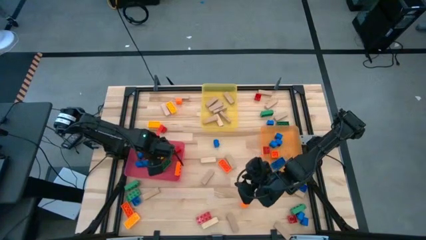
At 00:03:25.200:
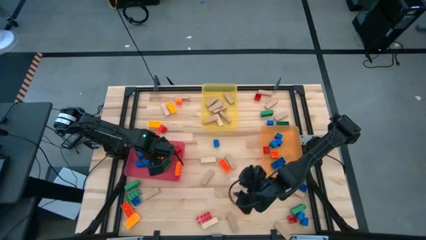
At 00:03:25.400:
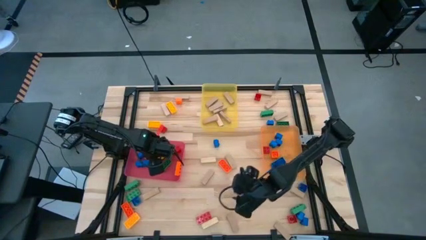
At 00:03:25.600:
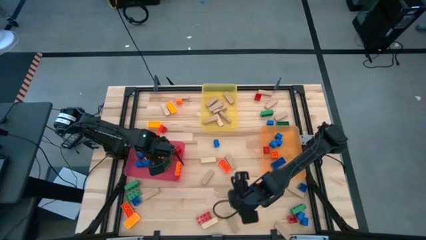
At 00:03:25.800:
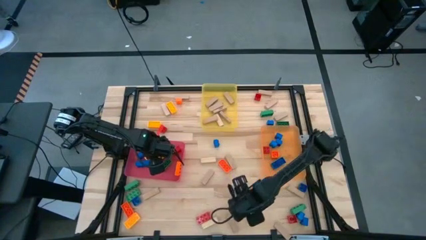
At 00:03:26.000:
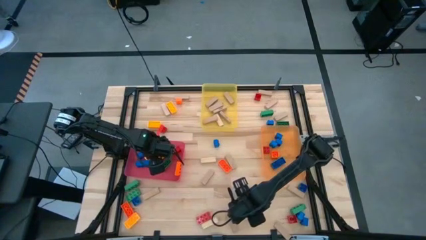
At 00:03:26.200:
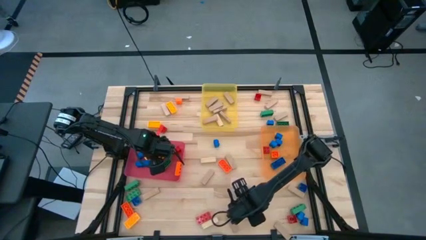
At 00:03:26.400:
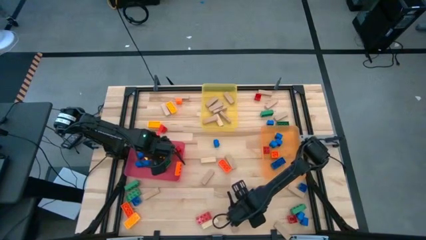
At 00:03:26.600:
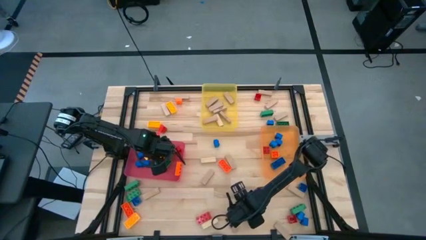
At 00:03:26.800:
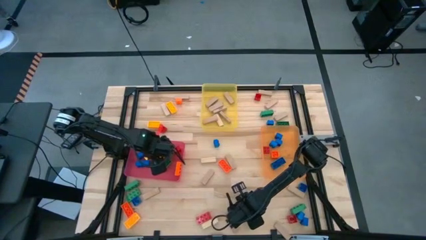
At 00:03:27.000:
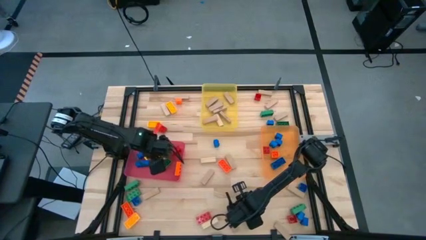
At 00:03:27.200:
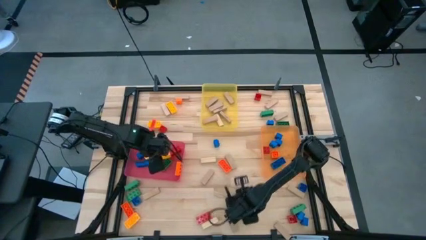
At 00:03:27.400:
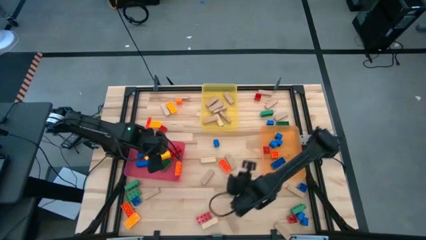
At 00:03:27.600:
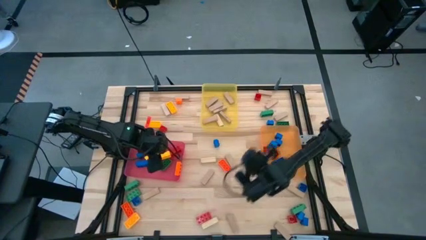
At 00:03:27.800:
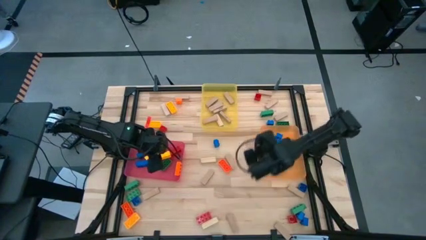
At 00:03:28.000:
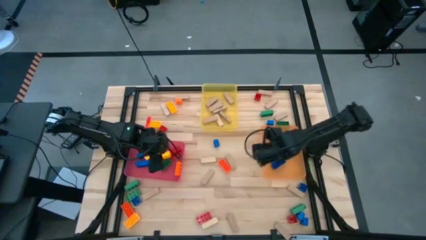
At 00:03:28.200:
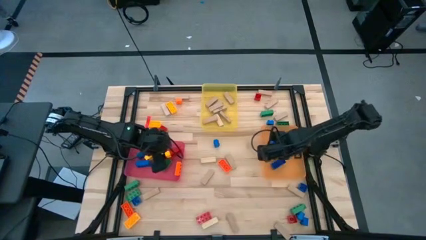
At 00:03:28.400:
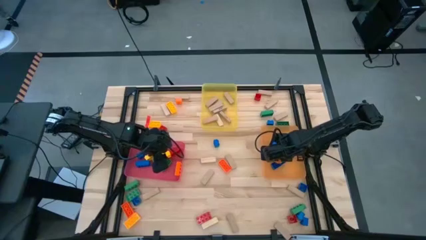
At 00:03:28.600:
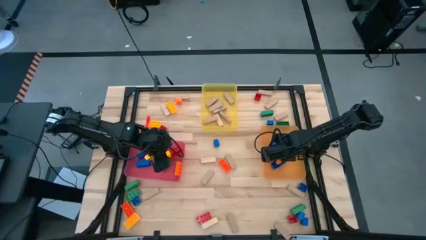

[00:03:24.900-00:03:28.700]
Task: Sort blocks by size
Put the 1 stud orange game piece into the orange bin

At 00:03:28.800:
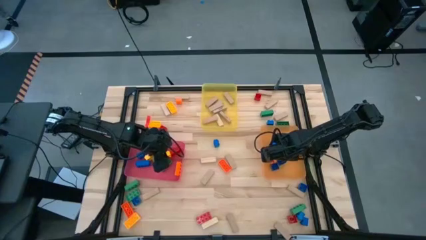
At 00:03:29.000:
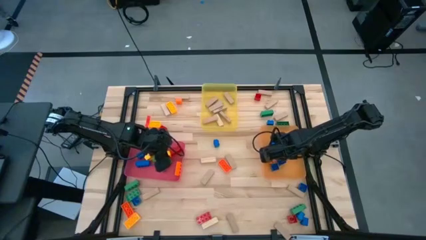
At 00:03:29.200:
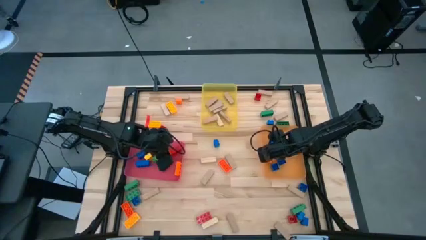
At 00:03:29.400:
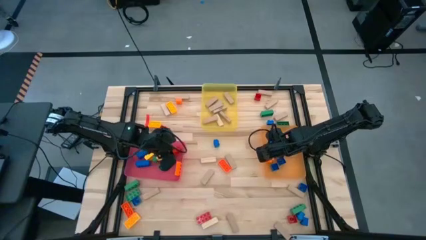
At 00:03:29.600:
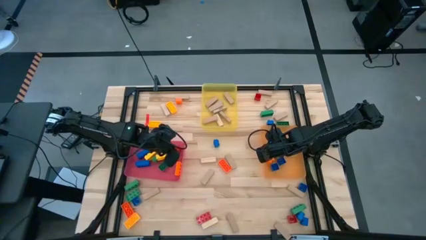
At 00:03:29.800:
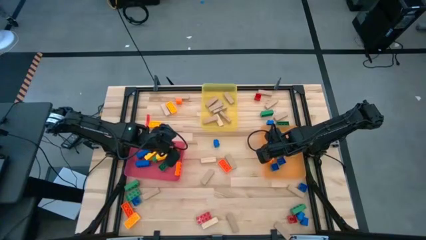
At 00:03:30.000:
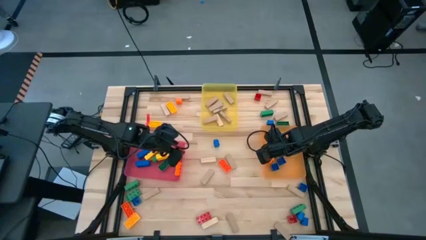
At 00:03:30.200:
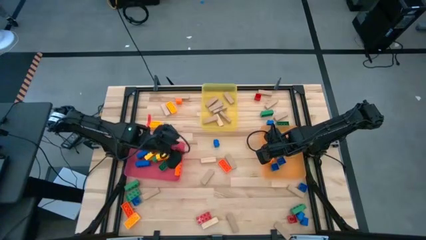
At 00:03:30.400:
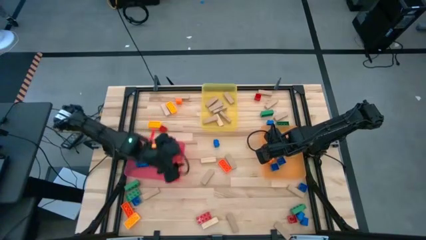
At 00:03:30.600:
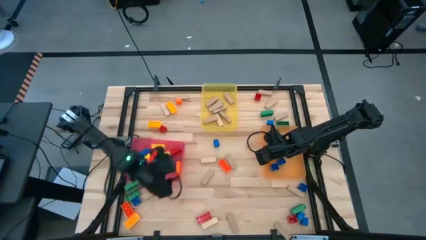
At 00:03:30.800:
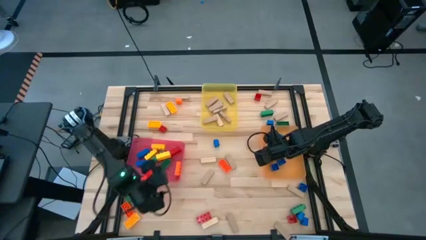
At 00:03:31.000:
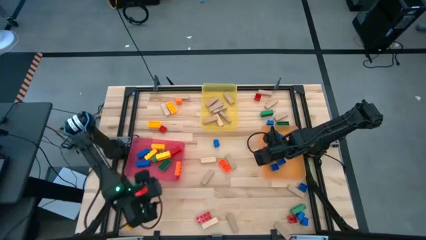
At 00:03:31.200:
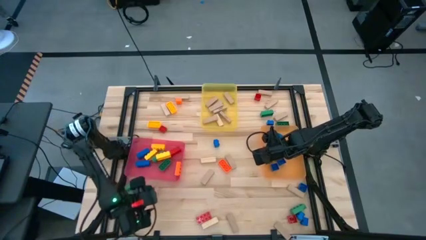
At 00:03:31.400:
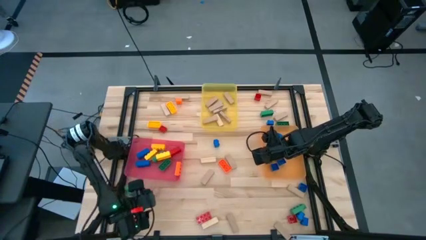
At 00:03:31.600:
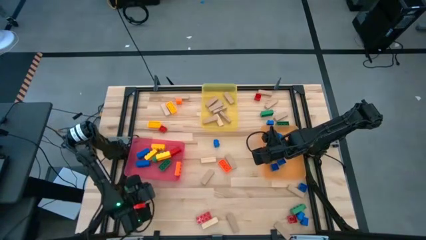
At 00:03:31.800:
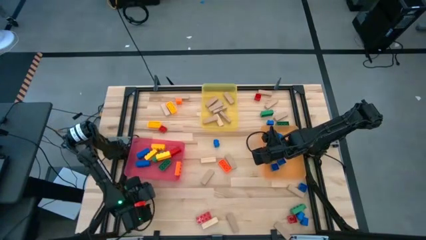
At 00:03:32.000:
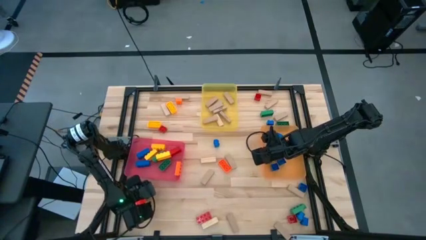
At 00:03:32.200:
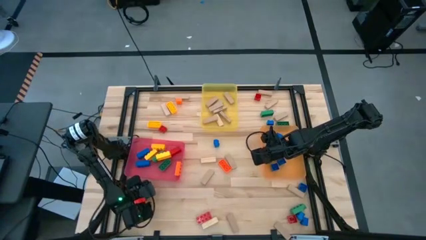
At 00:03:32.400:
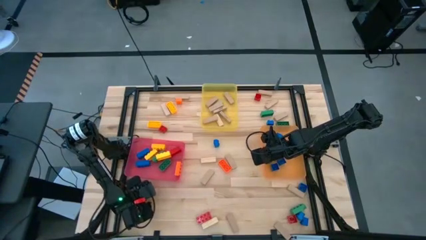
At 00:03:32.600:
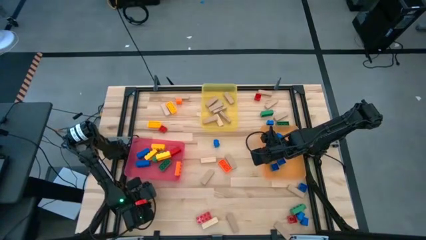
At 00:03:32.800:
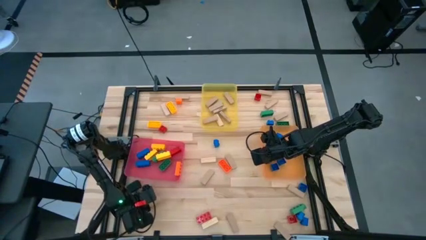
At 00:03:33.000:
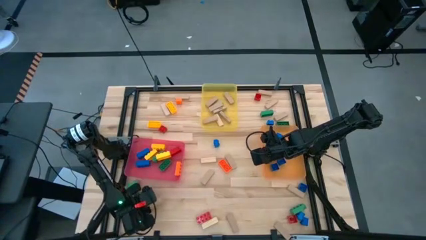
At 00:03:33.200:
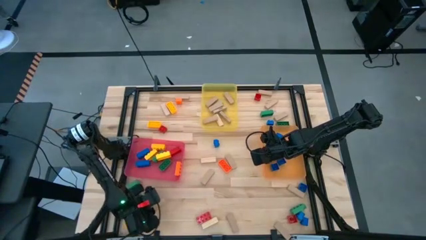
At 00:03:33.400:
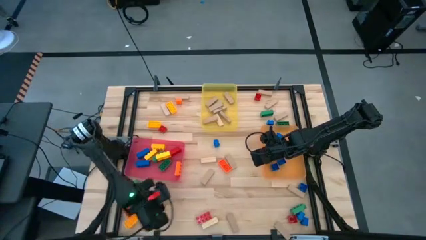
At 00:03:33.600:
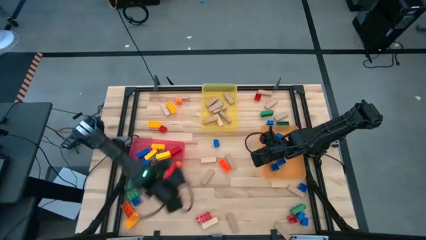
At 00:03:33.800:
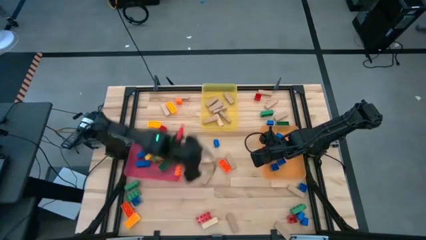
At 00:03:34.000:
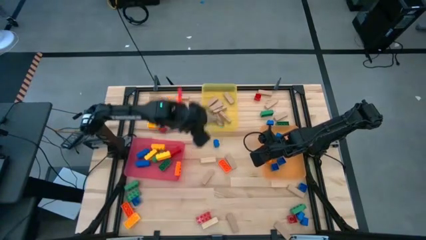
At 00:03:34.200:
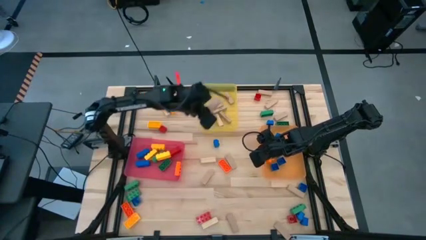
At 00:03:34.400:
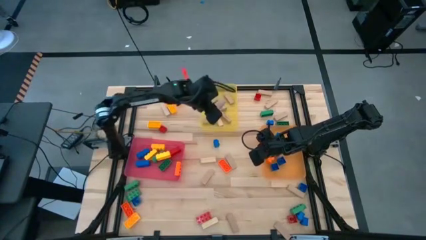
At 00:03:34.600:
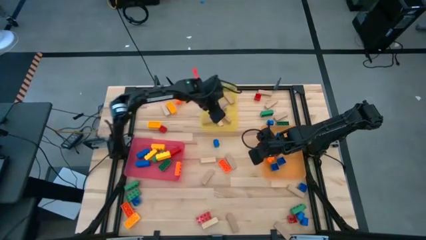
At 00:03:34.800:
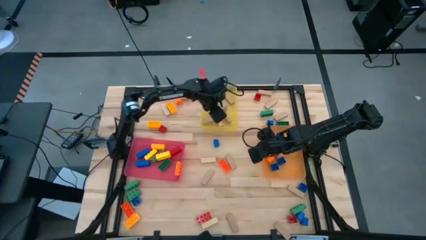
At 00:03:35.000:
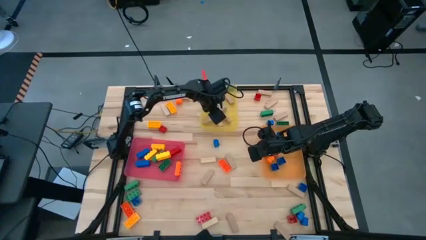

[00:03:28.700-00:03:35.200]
Put the wooden block into the yellow bin

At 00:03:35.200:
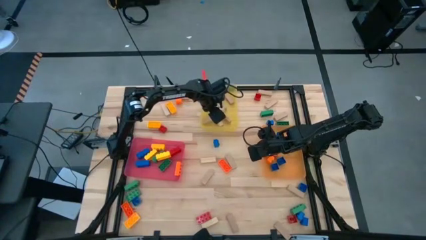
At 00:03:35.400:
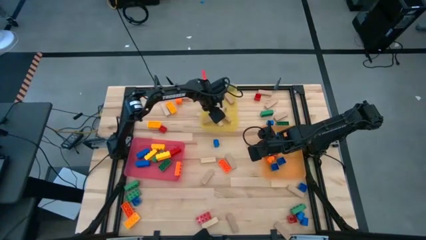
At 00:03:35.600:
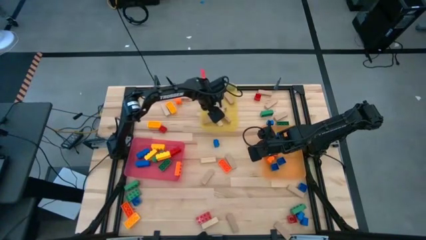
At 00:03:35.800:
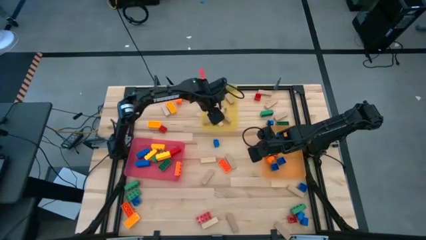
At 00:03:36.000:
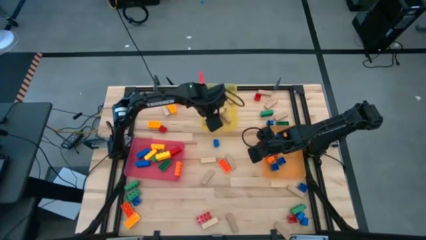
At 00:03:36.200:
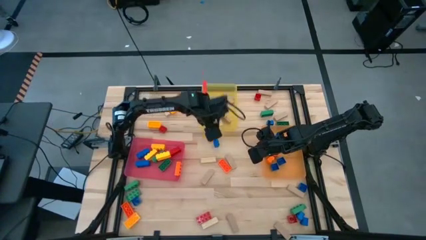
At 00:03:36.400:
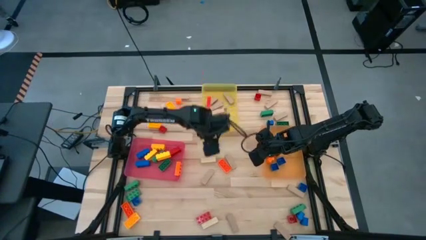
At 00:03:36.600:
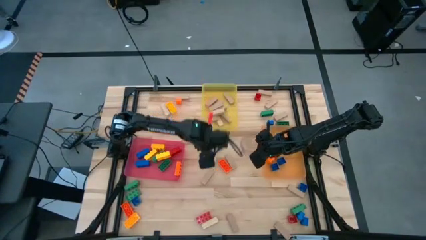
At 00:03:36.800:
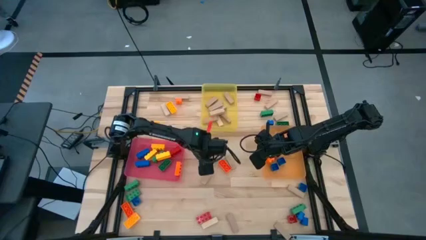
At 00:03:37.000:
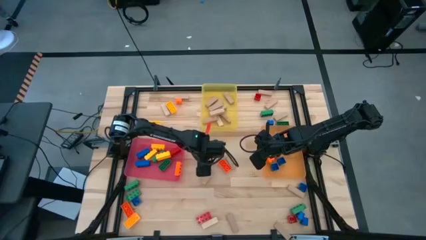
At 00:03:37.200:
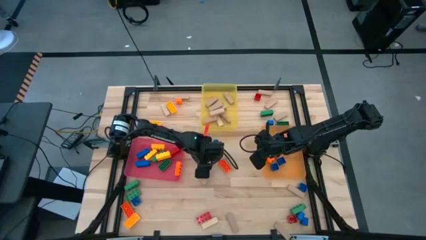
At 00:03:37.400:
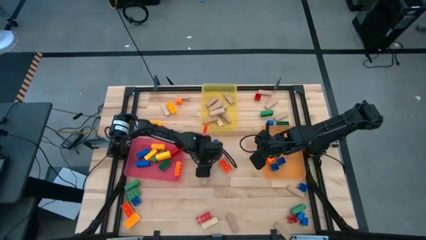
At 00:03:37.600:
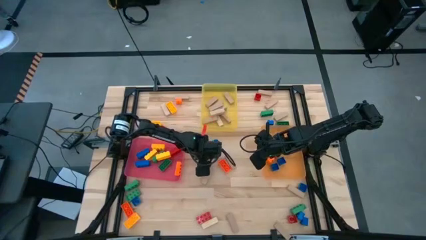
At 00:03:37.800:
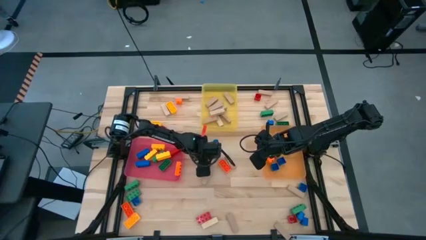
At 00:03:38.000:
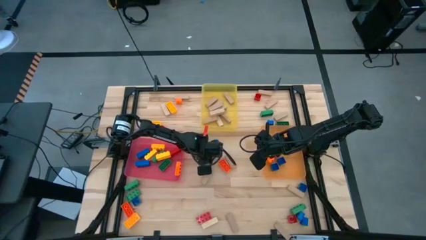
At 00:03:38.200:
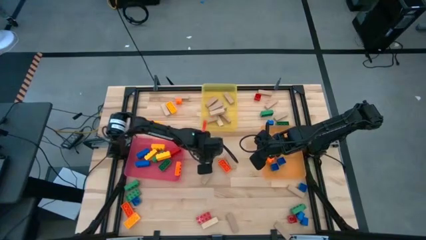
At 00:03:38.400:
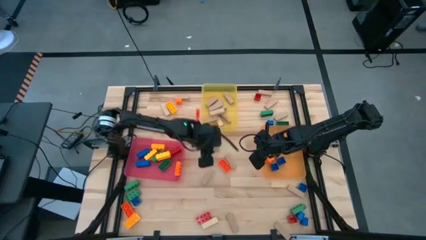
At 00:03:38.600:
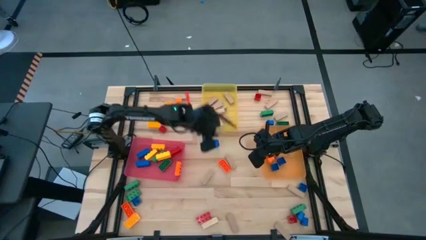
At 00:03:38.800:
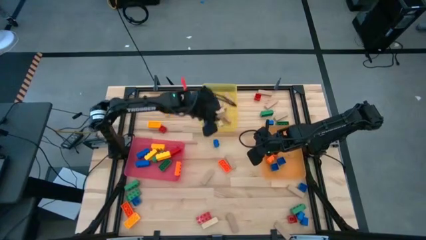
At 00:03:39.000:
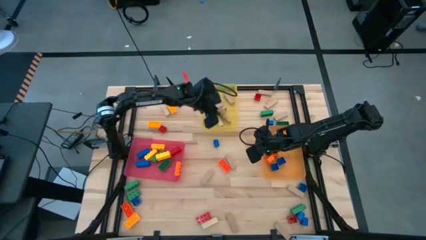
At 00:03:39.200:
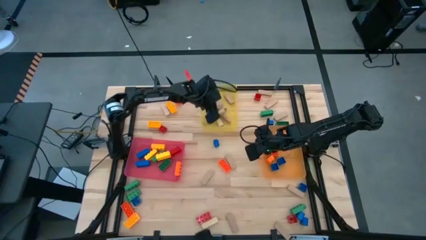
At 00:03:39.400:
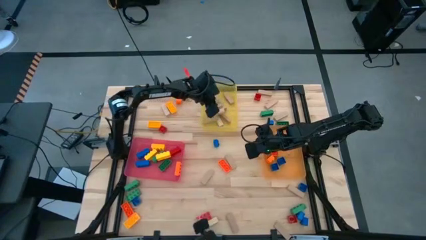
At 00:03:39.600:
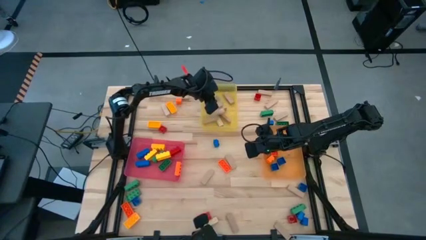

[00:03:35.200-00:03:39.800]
Put the wooden block into the yellow bin
